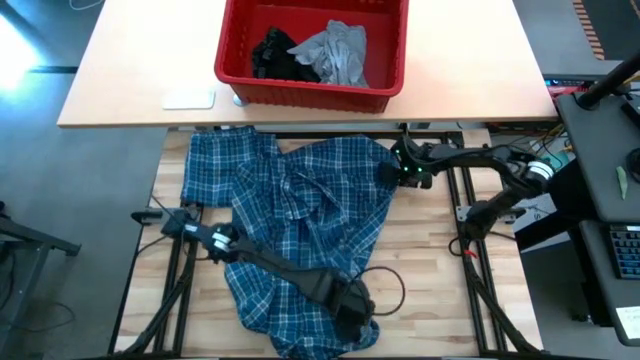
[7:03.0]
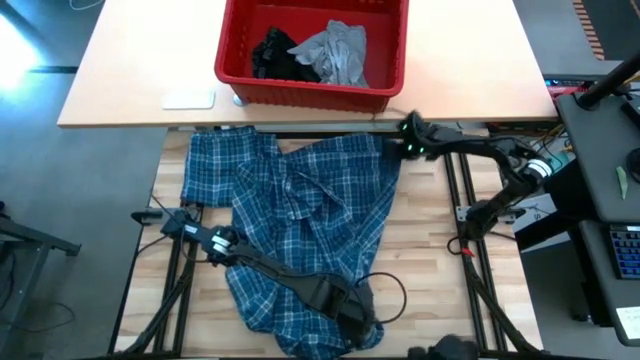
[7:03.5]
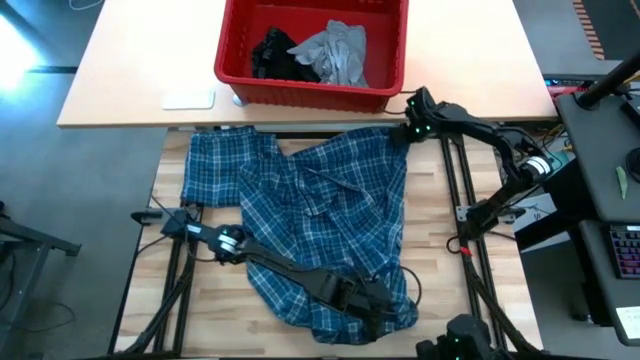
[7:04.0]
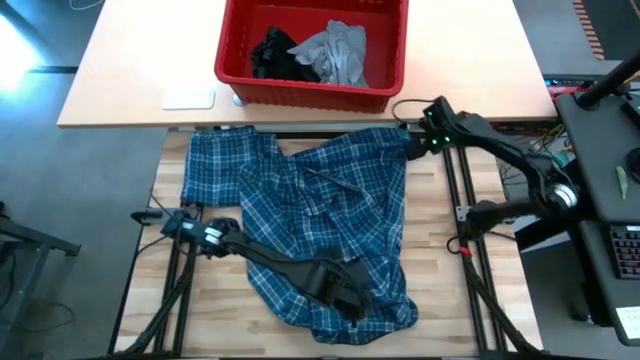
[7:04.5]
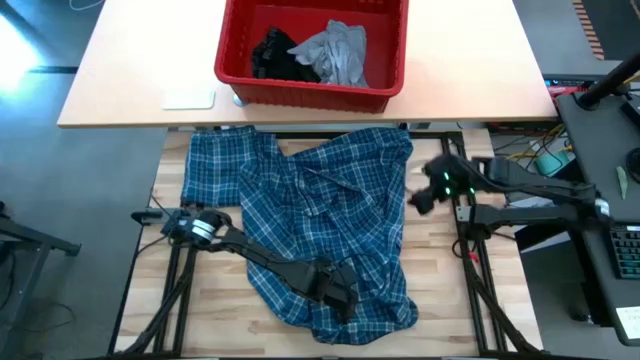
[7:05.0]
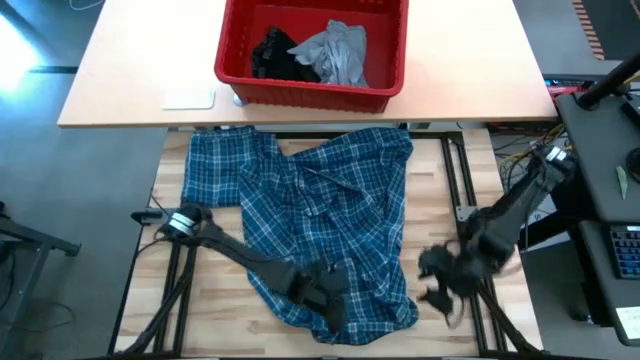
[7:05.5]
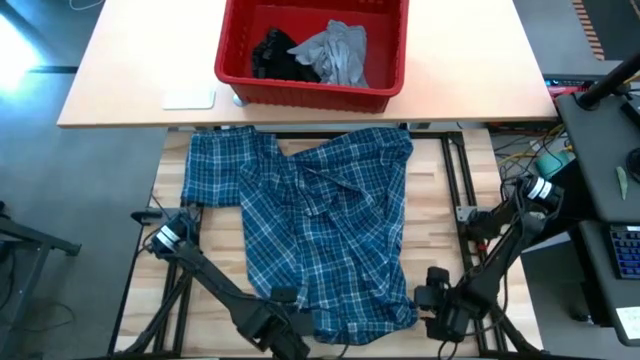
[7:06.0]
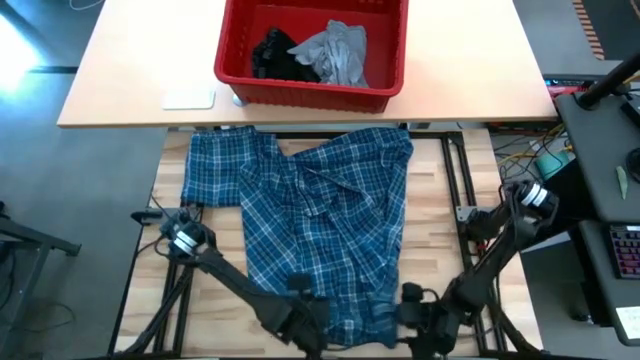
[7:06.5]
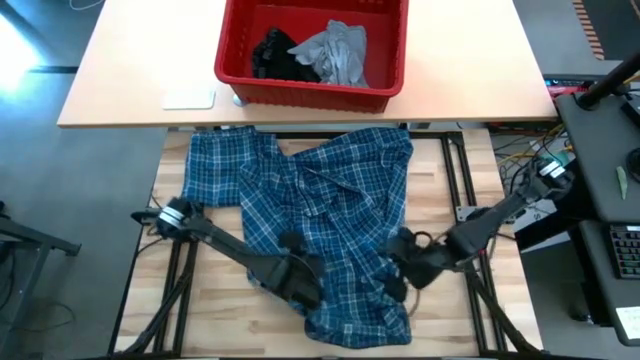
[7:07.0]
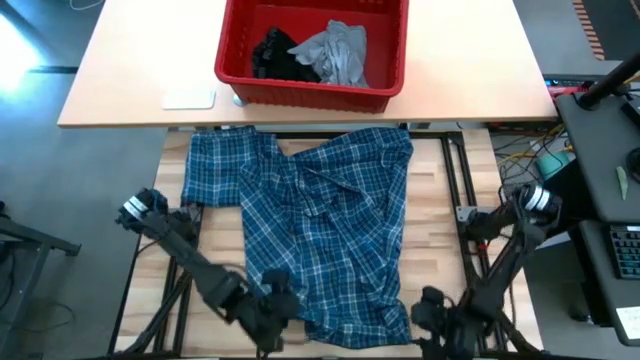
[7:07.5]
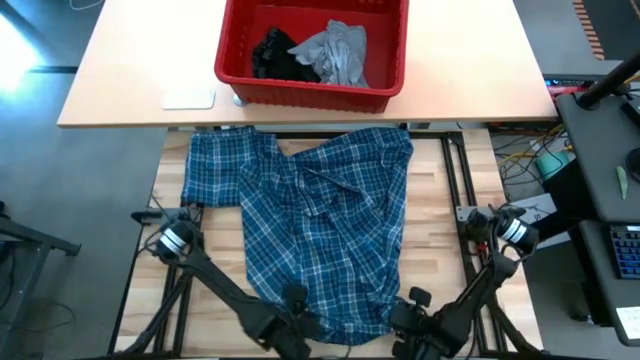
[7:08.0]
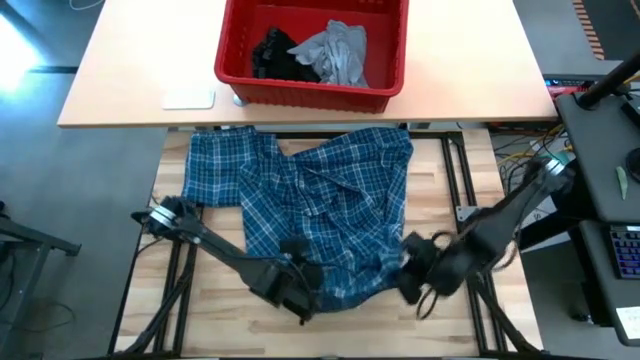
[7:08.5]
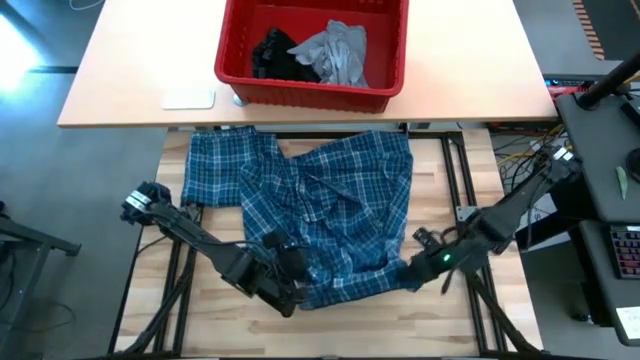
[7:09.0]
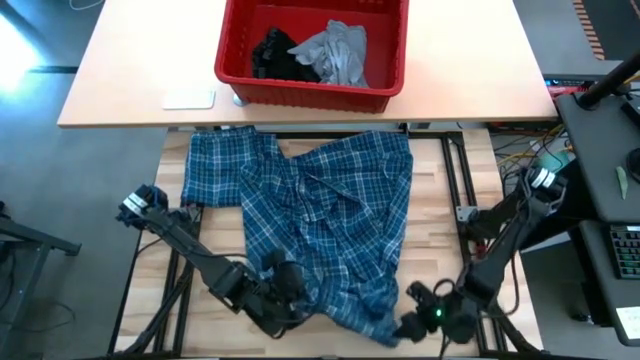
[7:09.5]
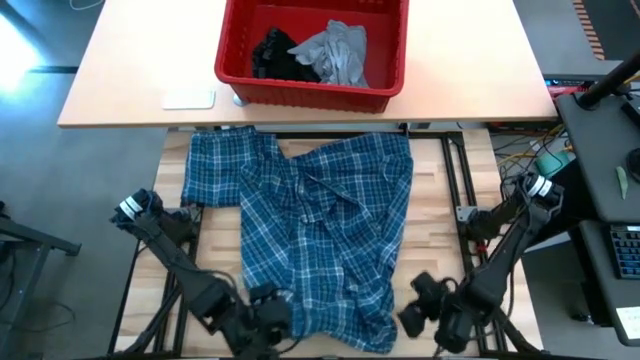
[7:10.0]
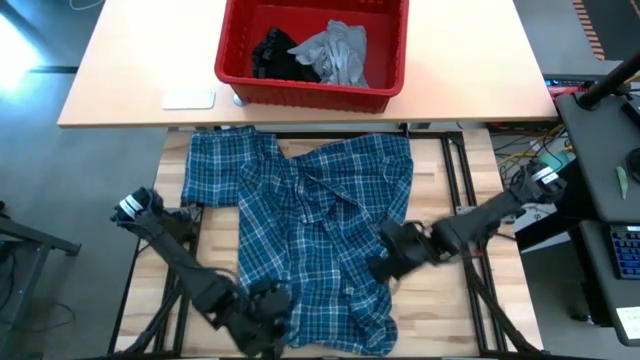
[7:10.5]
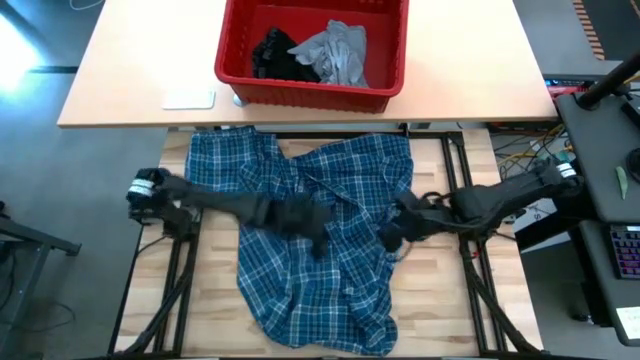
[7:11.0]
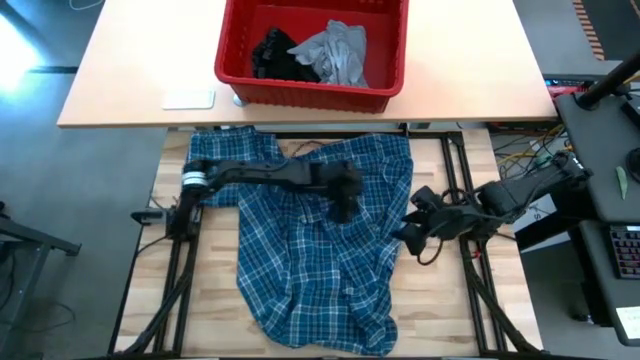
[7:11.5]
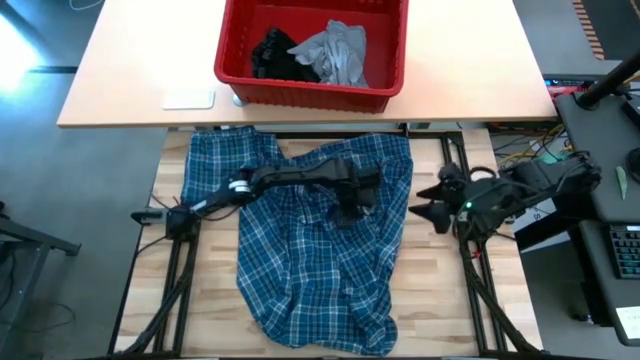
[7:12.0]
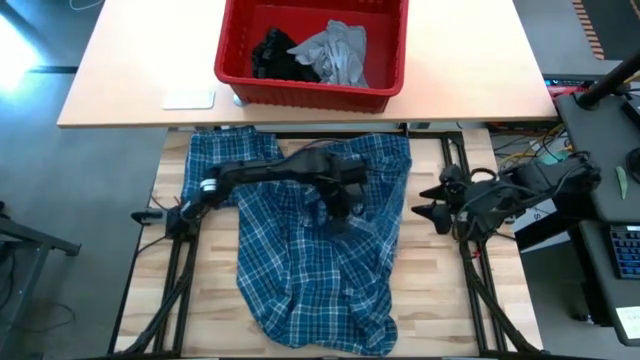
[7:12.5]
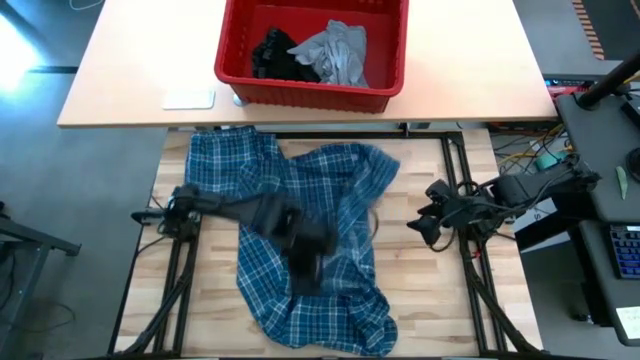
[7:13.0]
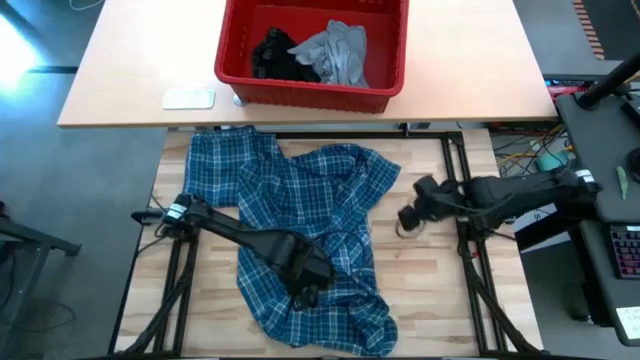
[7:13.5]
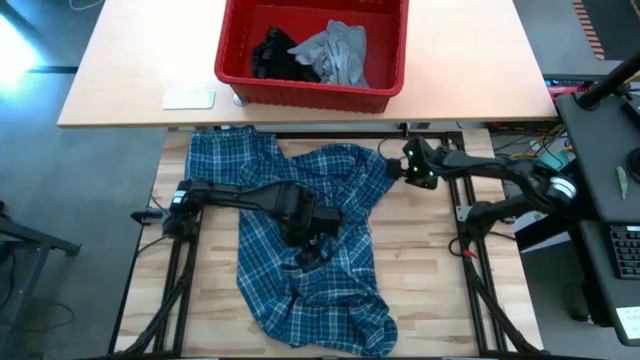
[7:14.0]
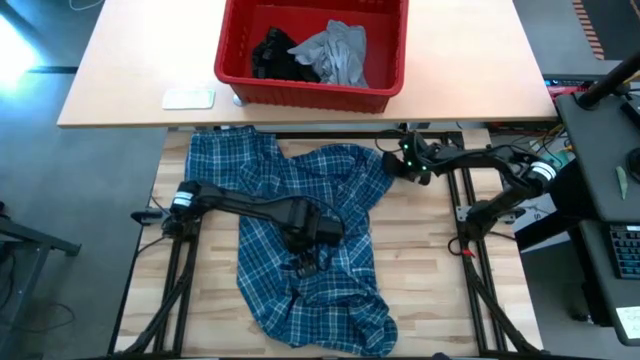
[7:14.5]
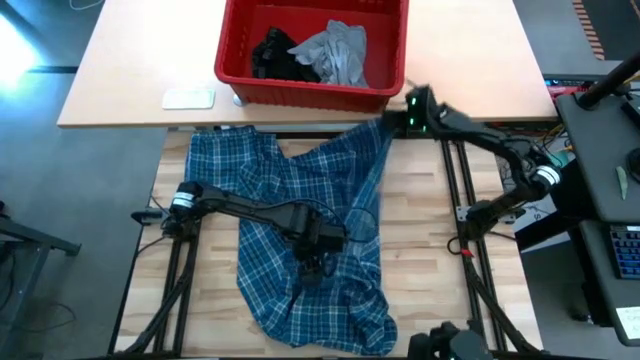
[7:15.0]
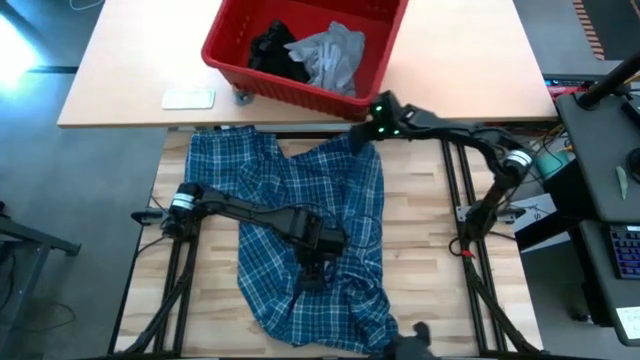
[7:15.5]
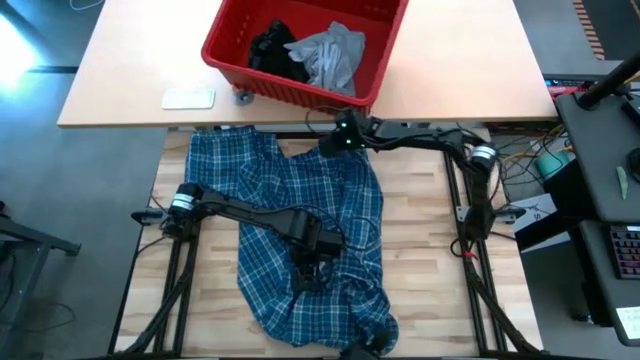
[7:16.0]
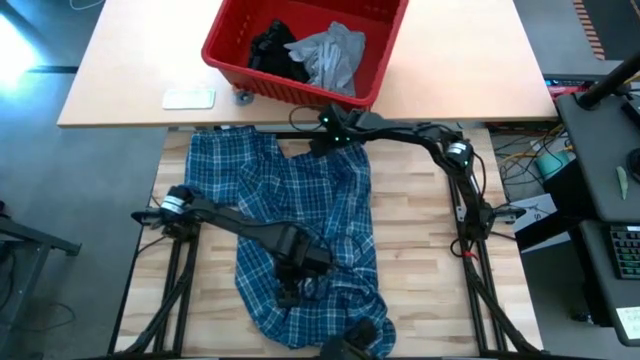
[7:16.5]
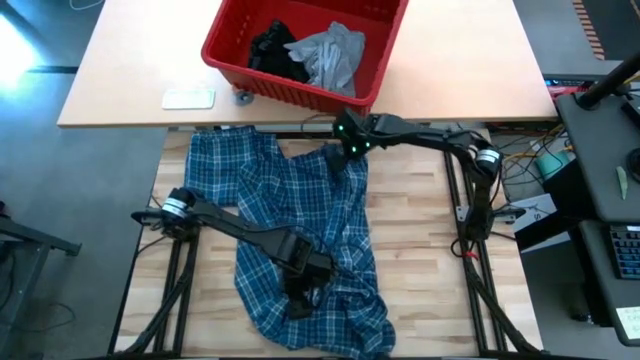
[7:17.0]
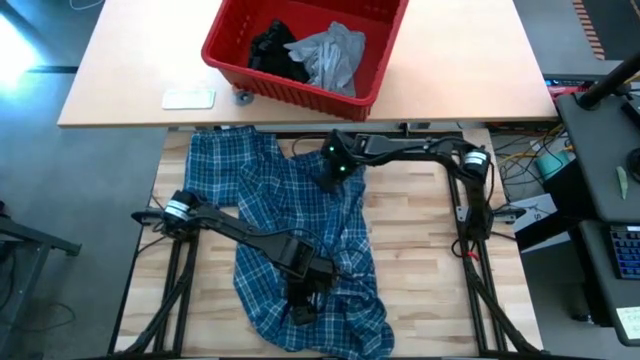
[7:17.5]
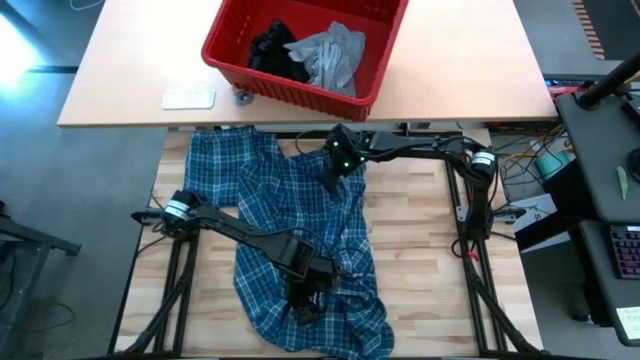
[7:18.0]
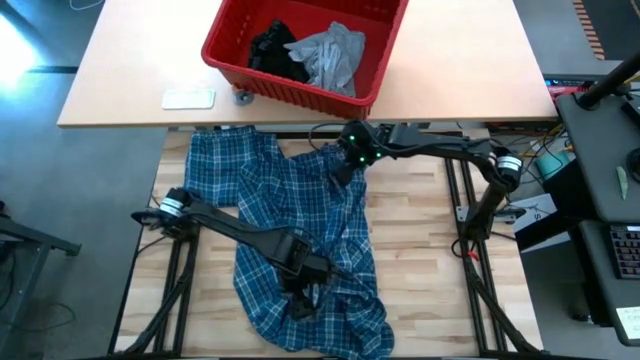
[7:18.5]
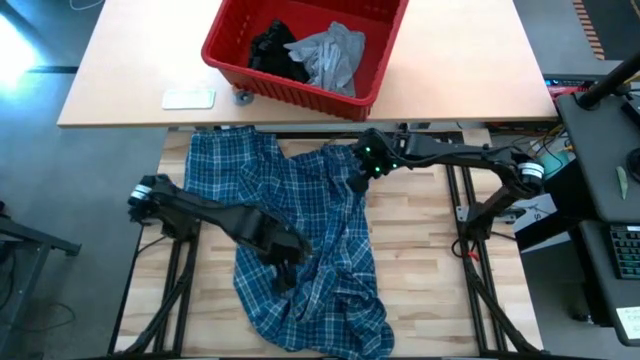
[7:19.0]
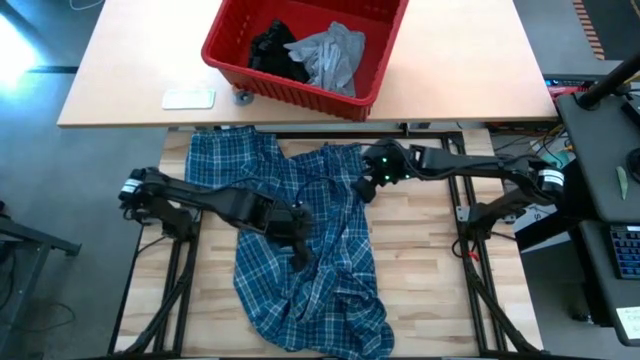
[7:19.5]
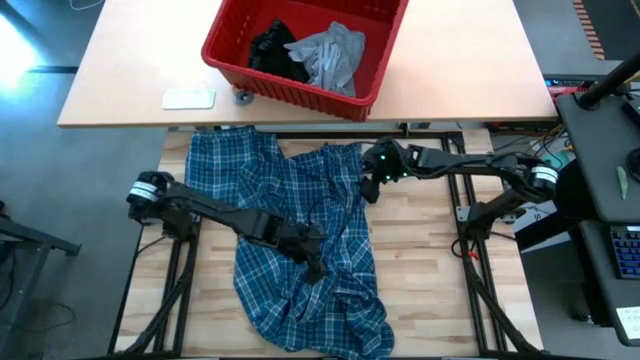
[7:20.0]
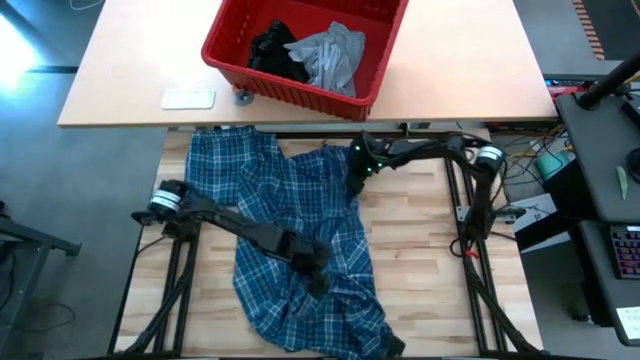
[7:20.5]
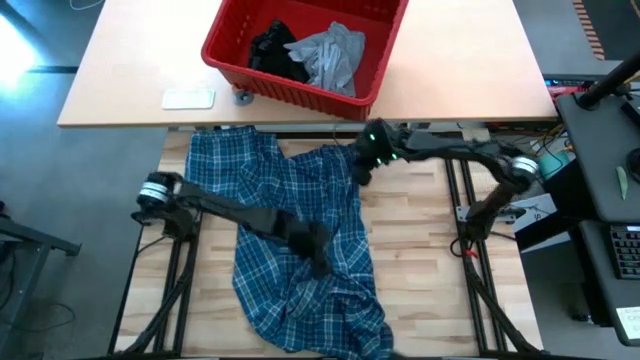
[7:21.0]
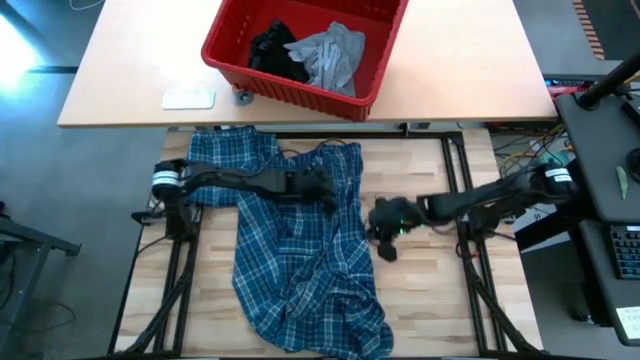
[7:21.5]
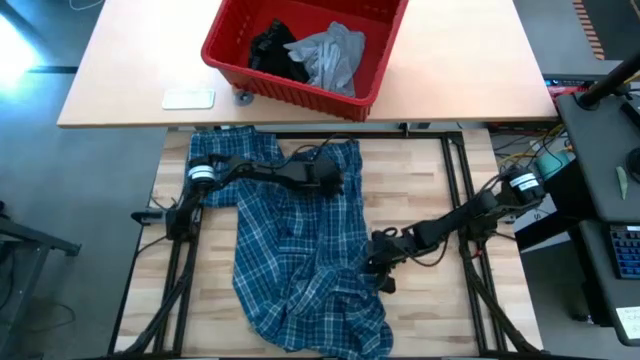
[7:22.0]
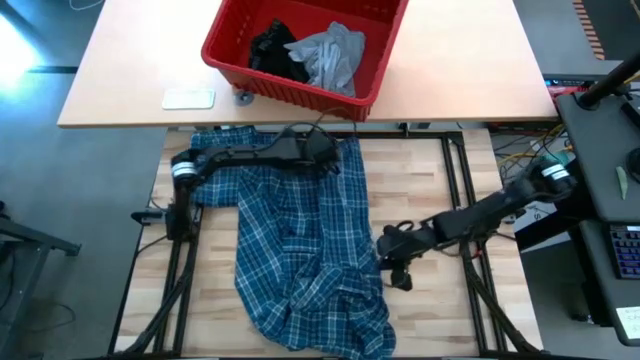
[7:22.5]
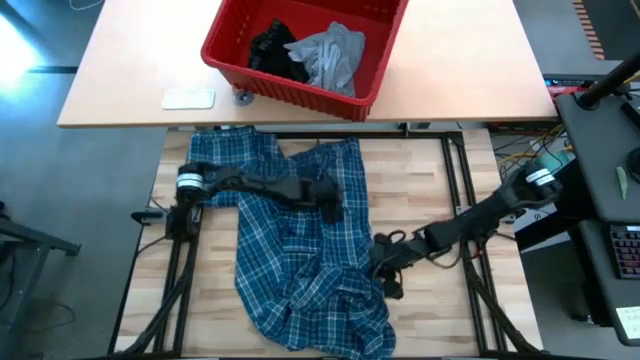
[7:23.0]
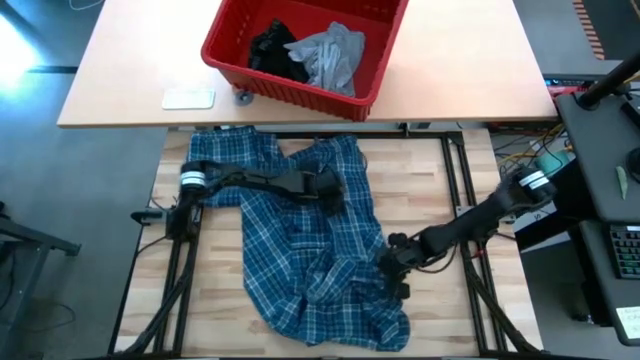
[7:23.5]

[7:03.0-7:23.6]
Task: Fold Laundry from Bin
Fold the blue patterned long sleeve shirt

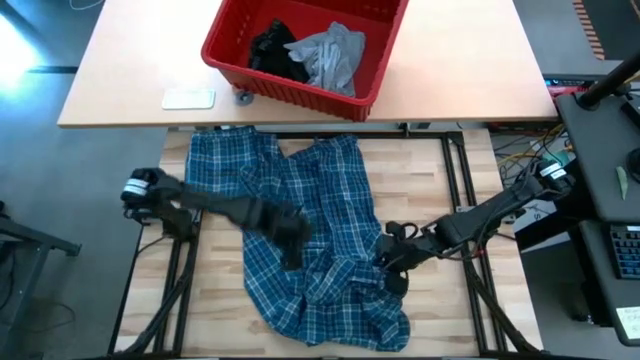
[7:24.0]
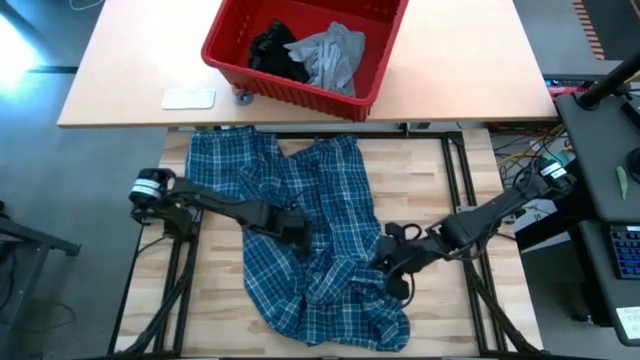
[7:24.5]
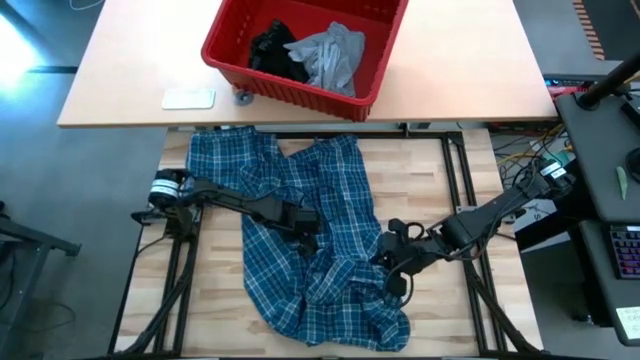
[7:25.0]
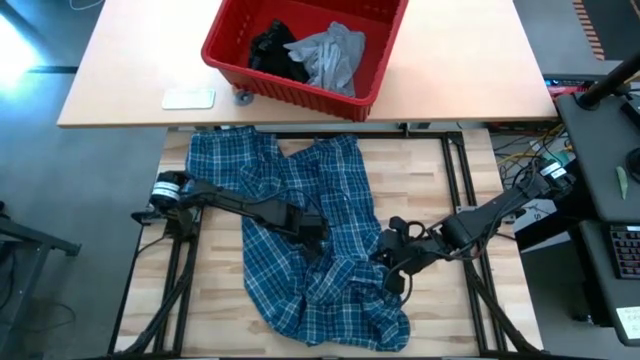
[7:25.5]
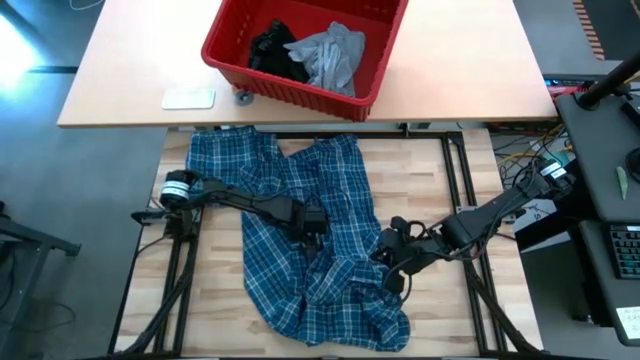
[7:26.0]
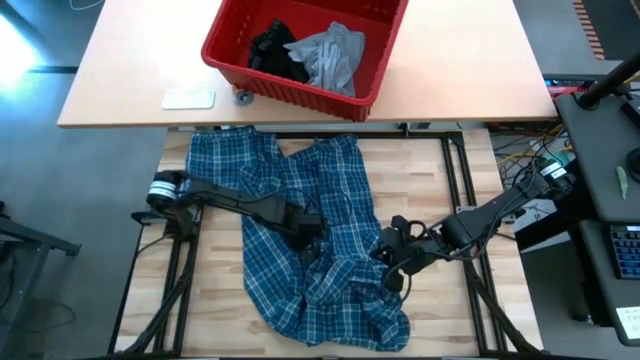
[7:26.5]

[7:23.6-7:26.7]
Fold the blue patterned long sleeve shirt
